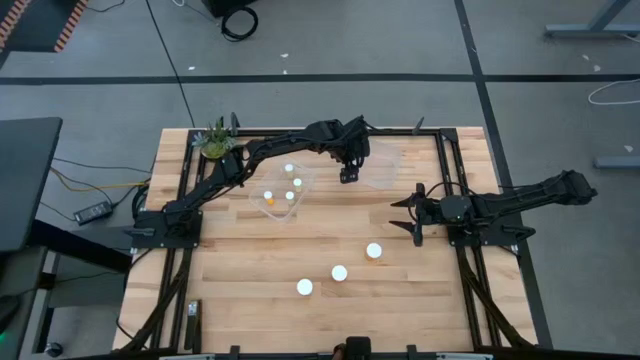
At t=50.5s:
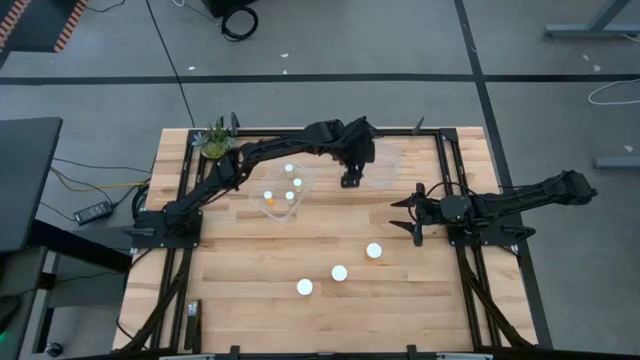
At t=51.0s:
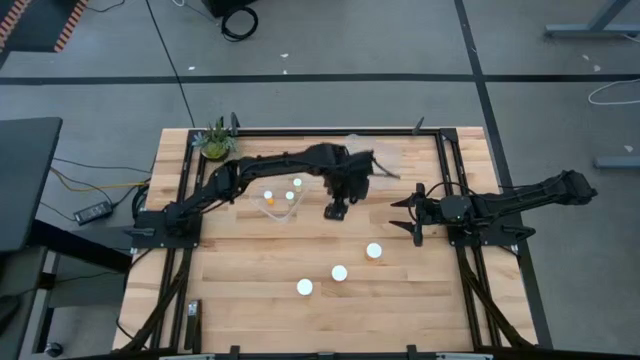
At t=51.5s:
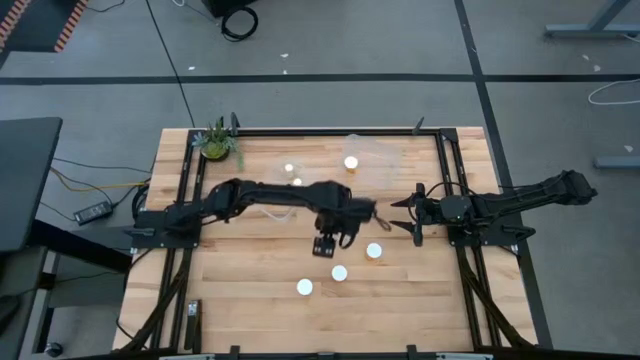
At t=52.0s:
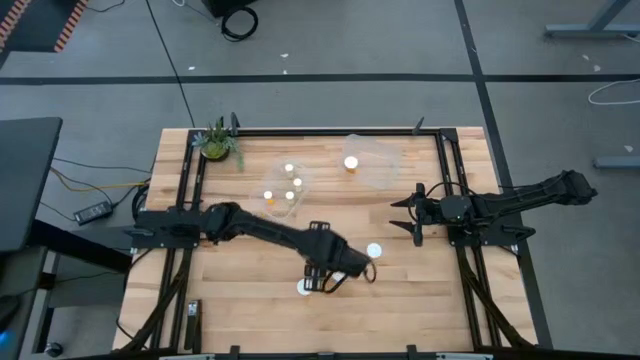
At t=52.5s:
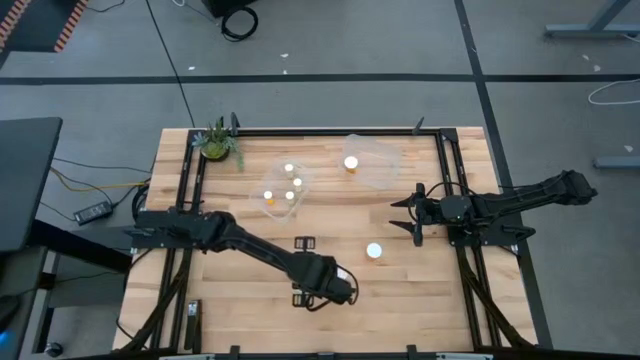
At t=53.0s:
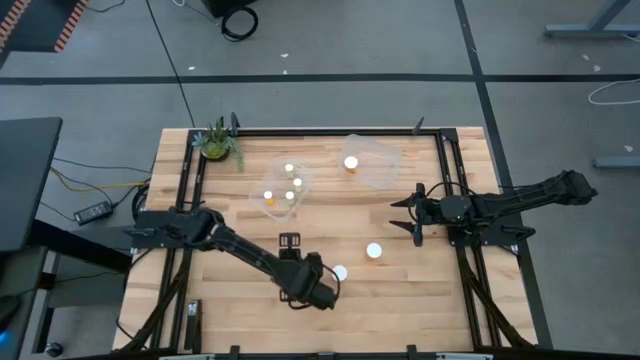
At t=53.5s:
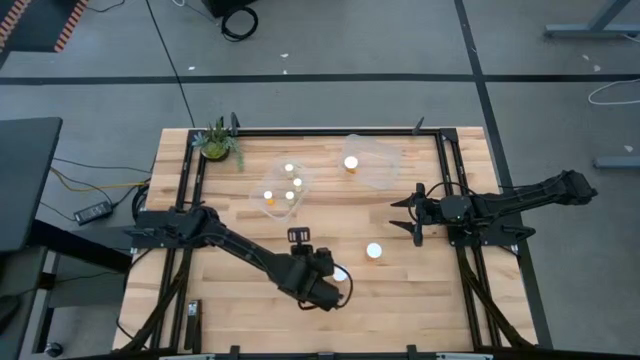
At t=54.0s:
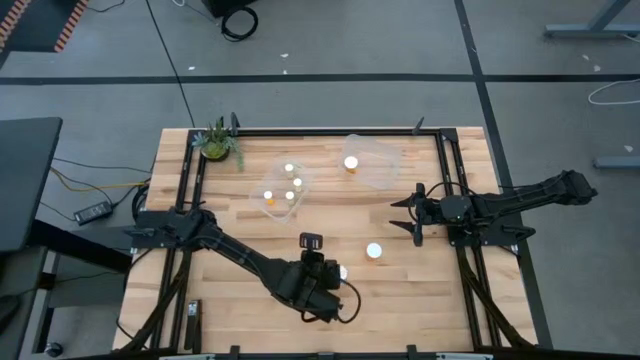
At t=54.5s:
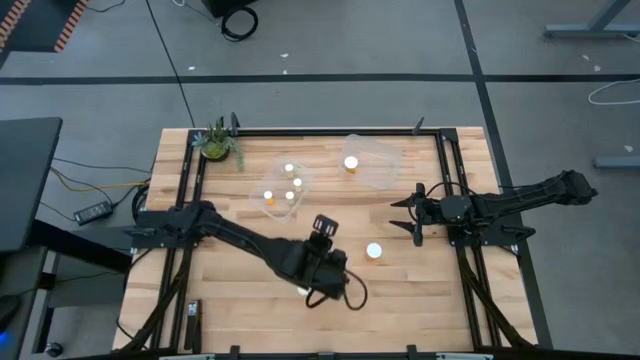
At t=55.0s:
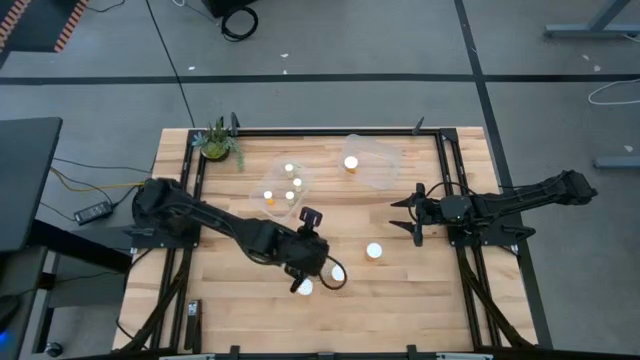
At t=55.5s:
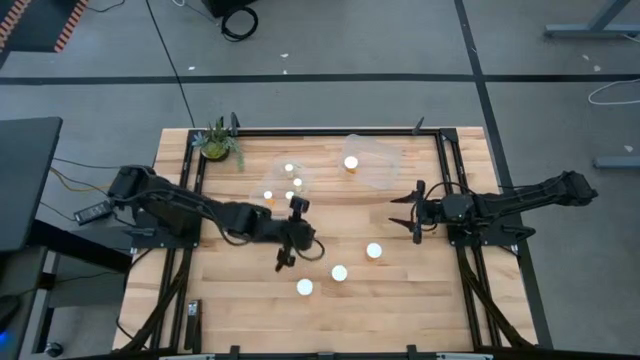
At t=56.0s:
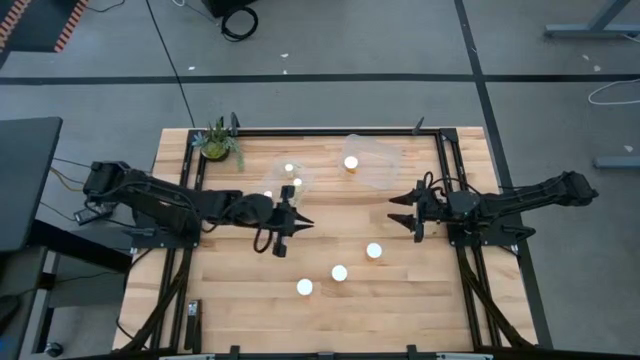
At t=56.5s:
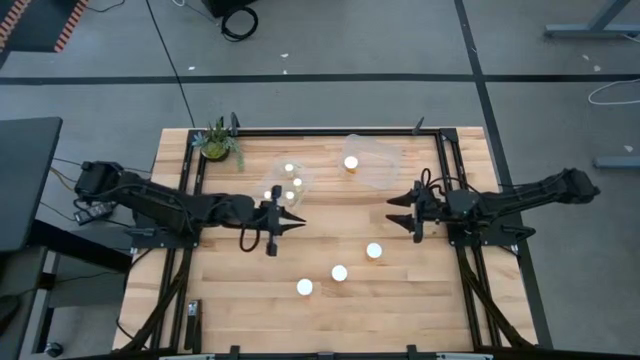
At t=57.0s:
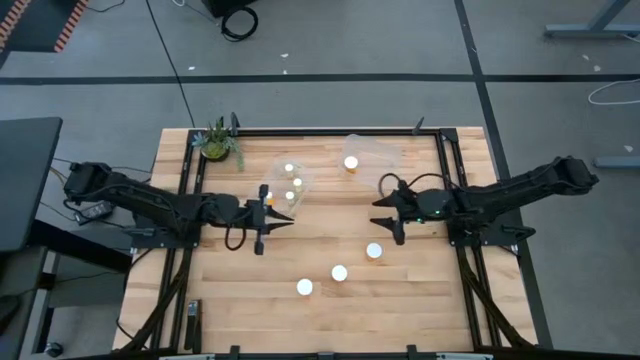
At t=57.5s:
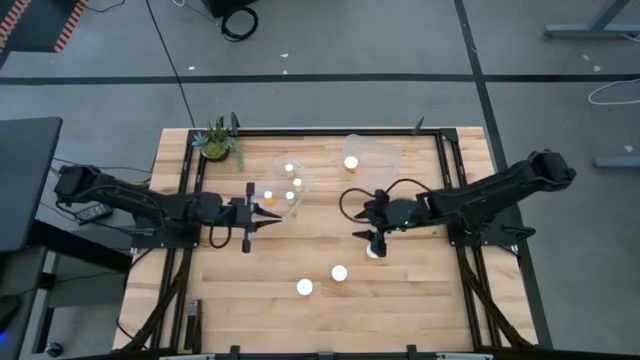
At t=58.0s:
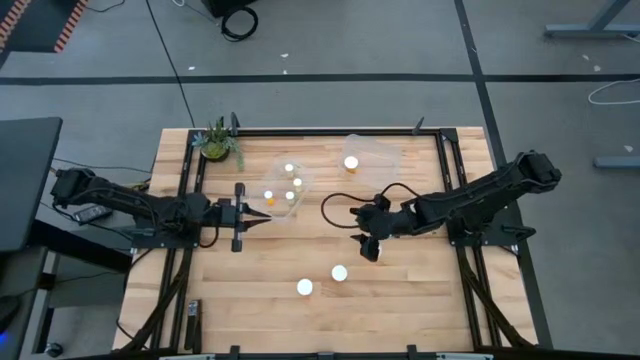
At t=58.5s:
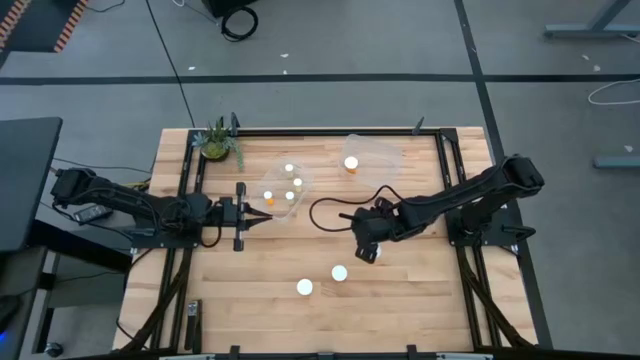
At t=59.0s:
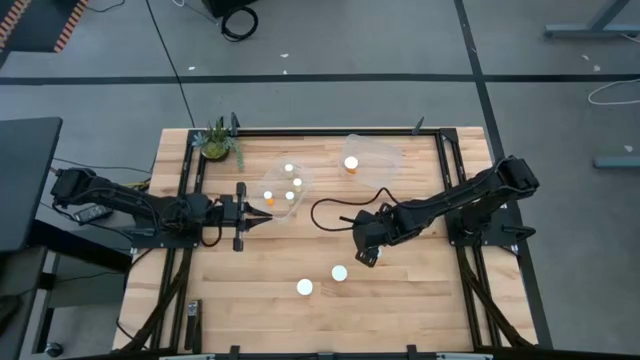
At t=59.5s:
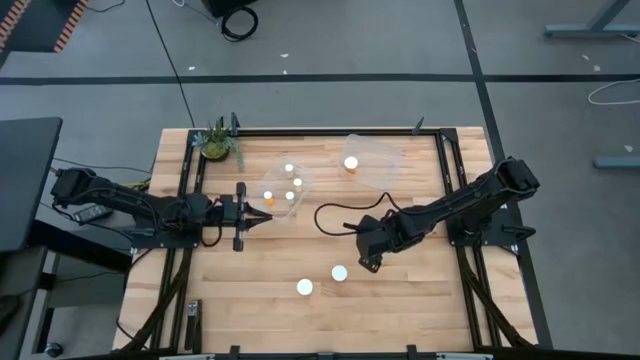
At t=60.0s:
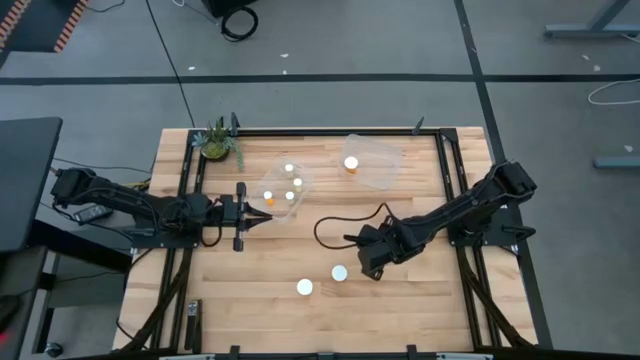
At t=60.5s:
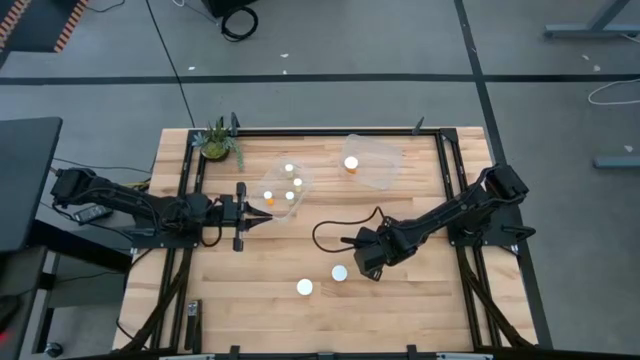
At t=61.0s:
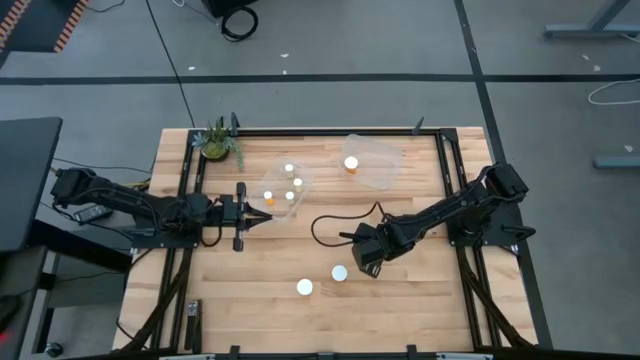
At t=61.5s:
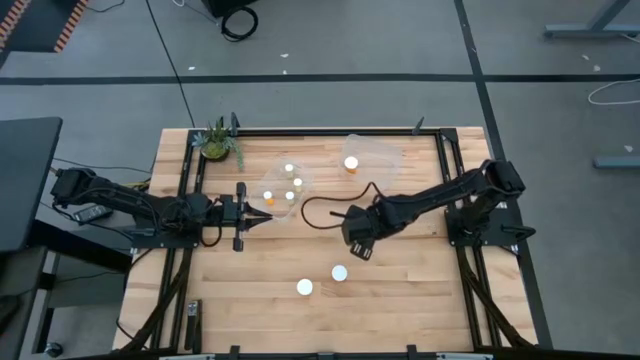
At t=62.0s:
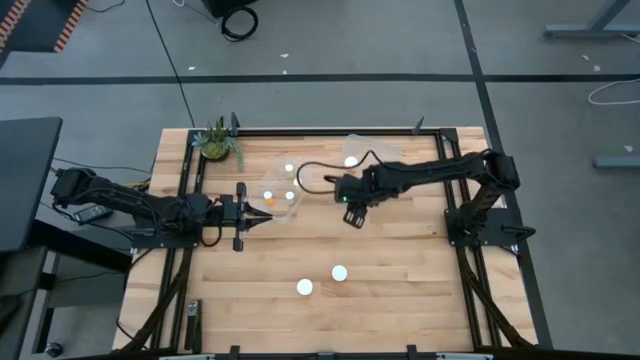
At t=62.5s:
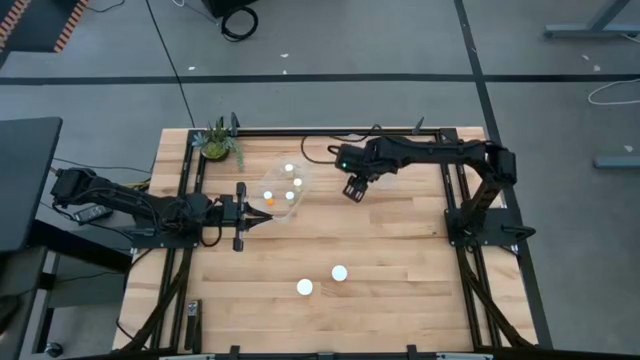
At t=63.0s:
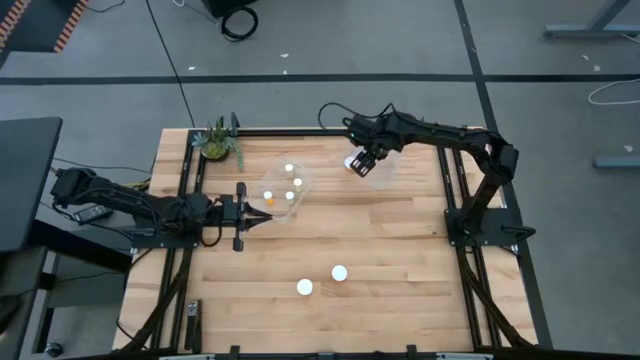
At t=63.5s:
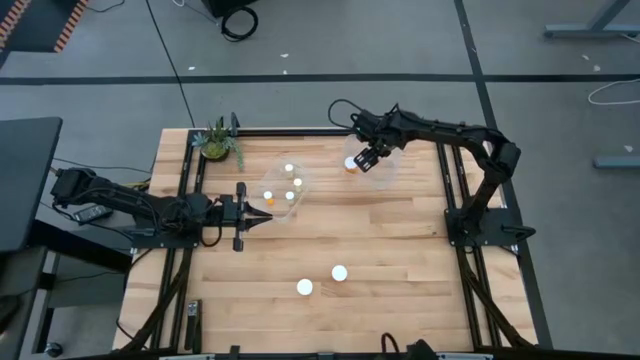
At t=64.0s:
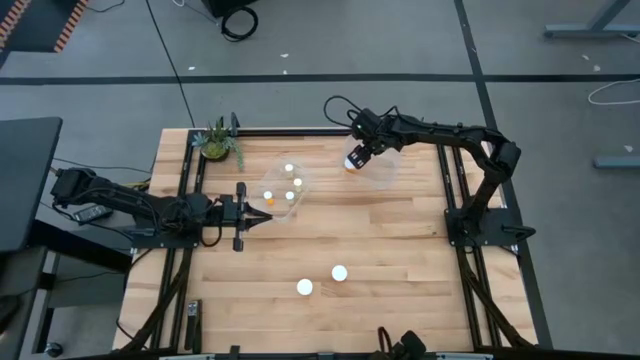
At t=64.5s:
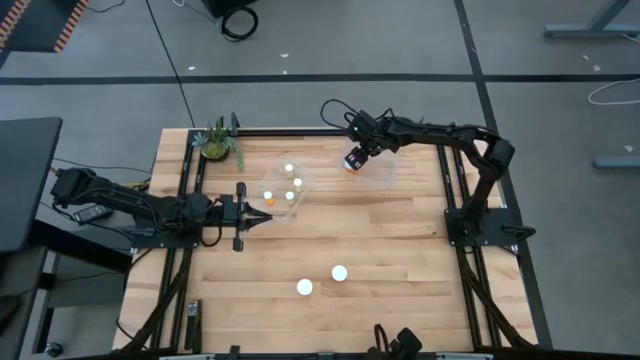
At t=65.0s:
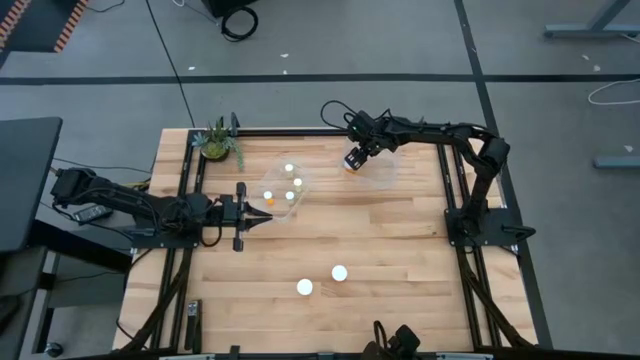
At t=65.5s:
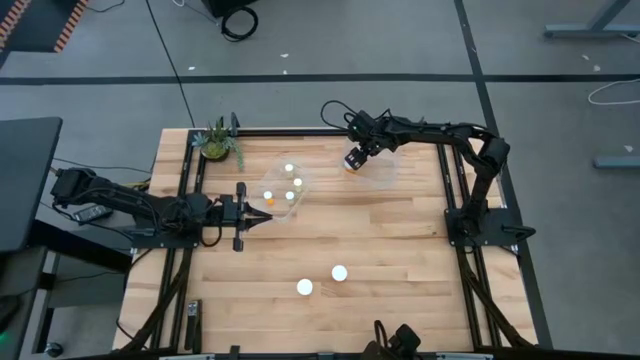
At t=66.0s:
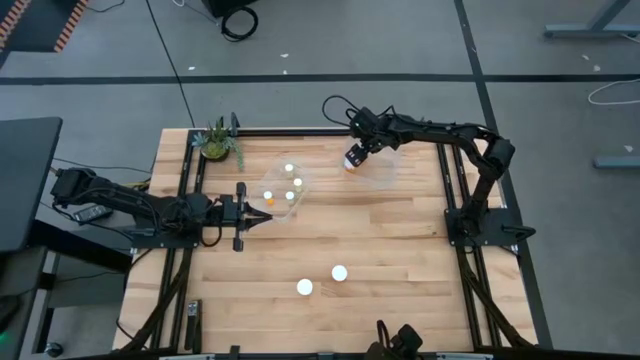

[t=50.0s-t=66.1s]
Task: Pick and place medicine bottles into bin by pill shape (circle, oval)
Put the big orange pill bottle into the right transparent bin

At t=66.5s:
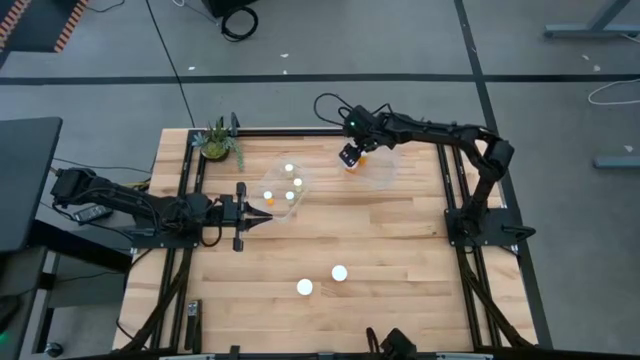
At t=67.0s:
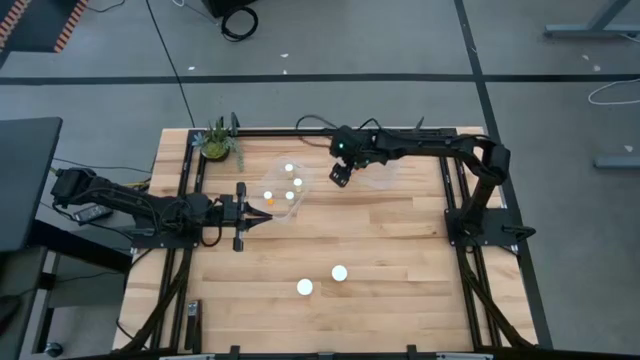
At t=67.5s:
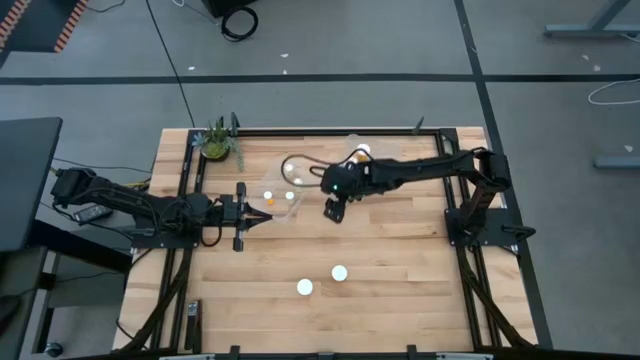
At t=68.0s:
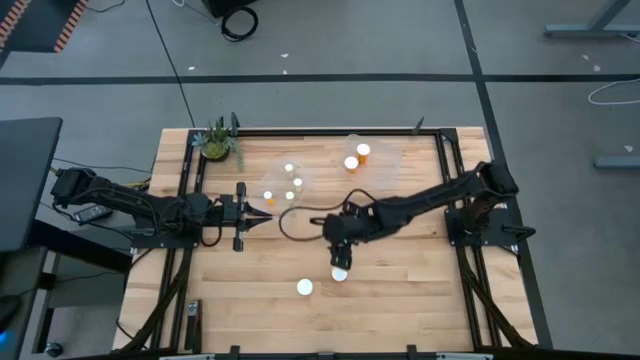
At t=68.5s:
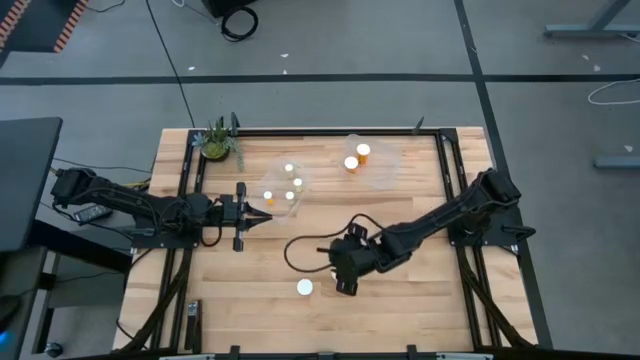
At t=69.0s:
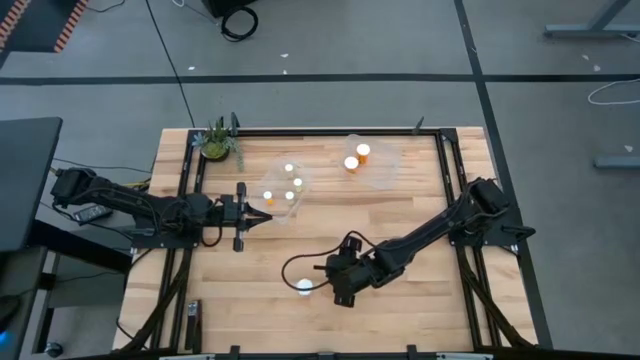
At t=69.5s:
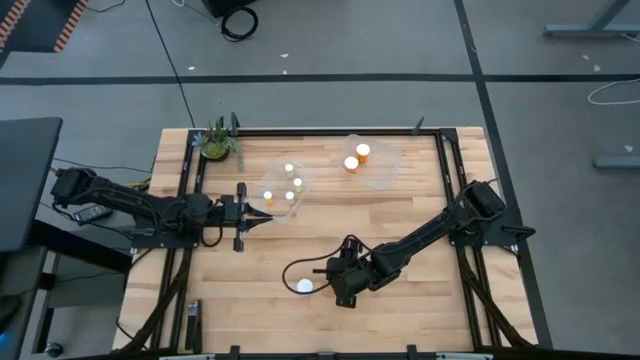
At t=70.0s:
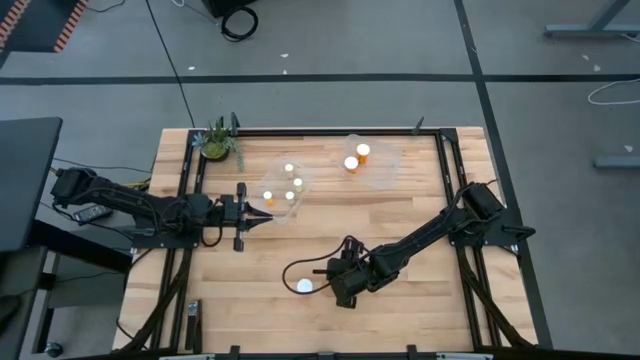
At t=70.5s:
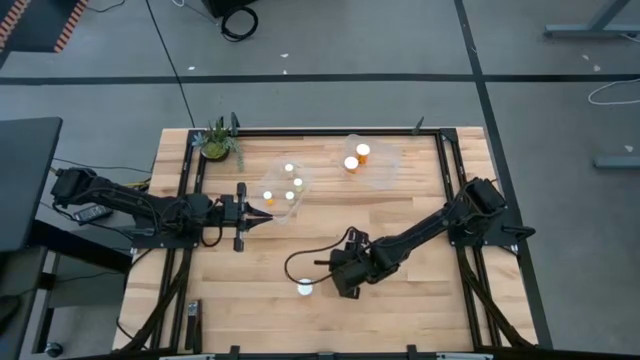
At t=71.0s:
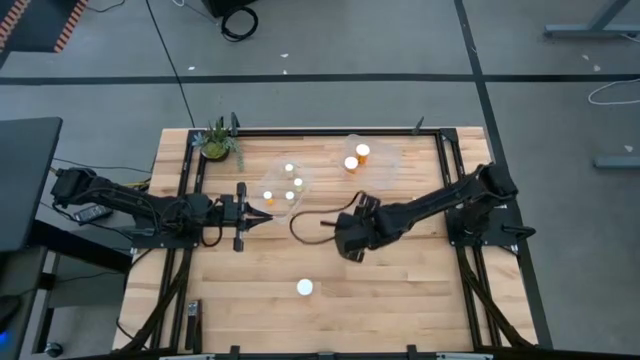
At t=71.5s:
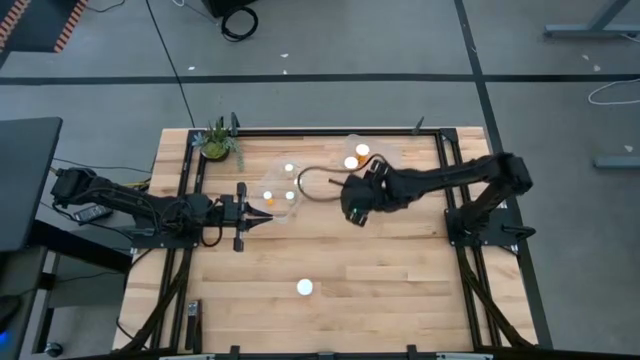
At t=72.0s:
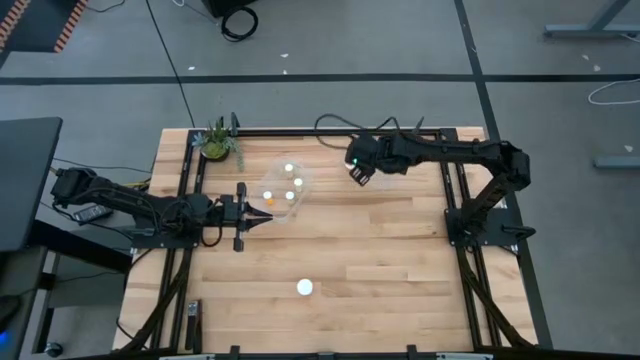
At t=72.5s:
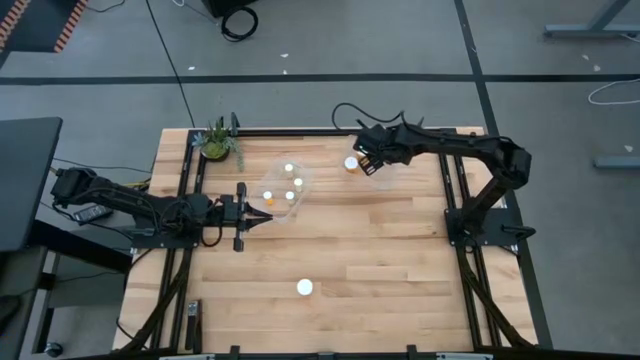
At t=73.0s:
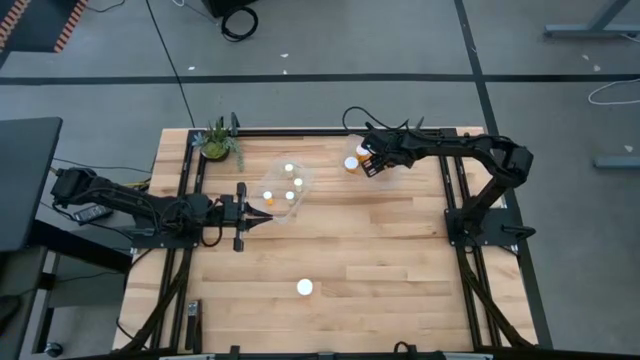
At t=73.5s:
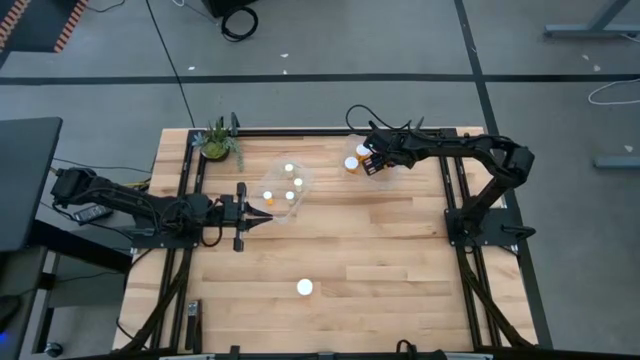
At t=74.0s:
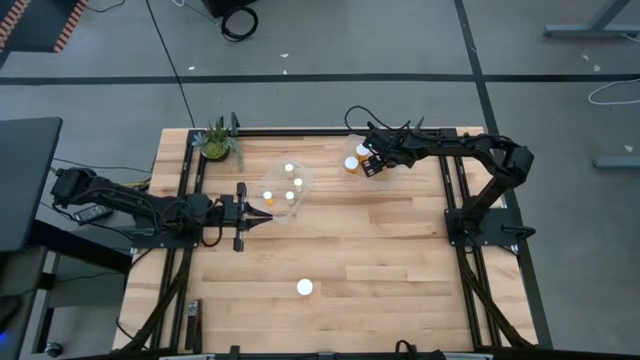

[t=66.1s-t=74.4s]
Put the big orange pill bottle into the right transparent bin
